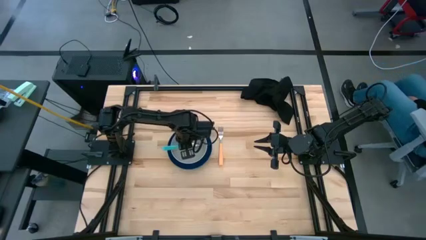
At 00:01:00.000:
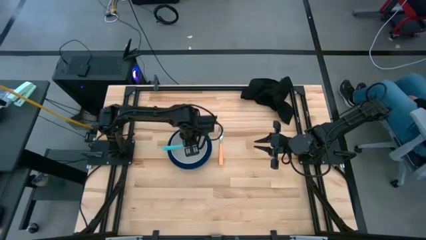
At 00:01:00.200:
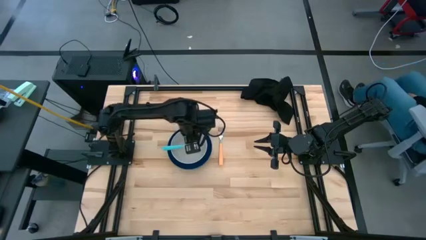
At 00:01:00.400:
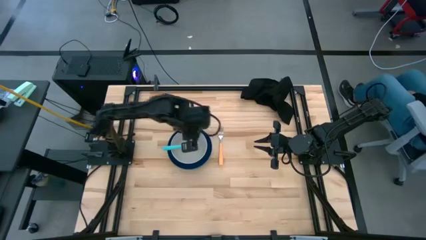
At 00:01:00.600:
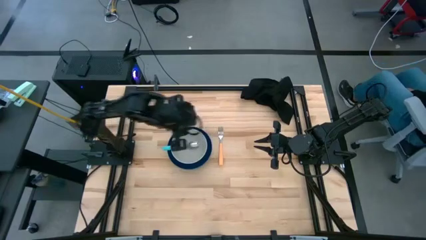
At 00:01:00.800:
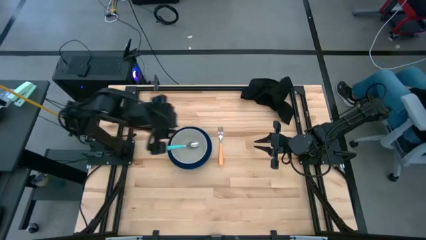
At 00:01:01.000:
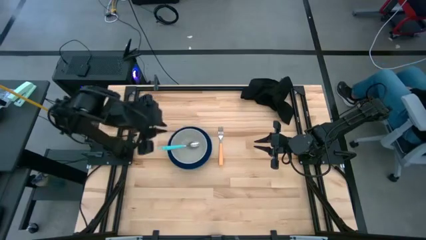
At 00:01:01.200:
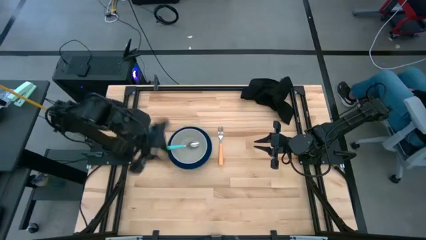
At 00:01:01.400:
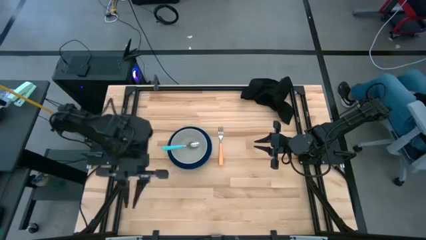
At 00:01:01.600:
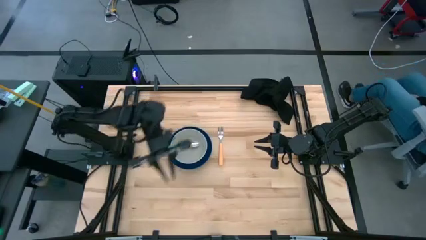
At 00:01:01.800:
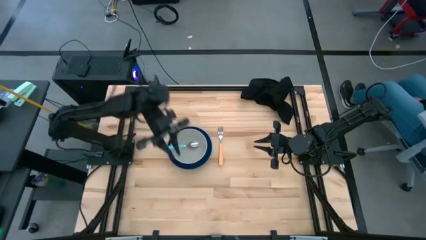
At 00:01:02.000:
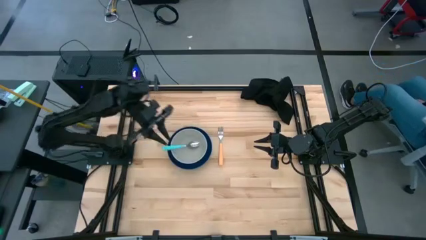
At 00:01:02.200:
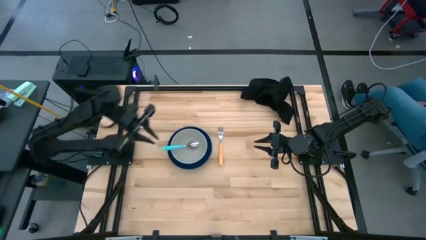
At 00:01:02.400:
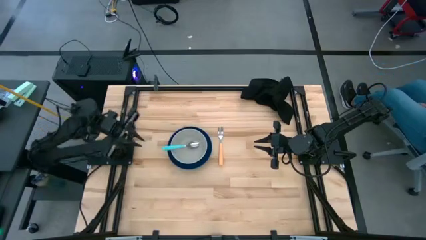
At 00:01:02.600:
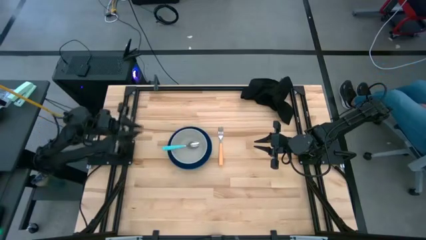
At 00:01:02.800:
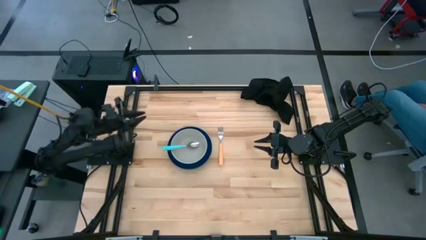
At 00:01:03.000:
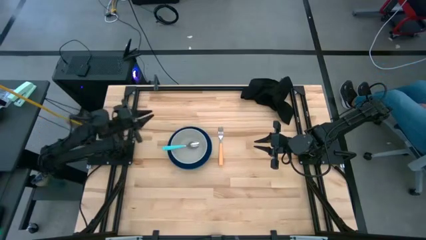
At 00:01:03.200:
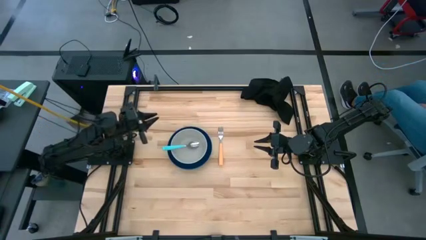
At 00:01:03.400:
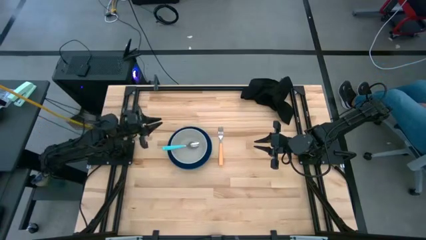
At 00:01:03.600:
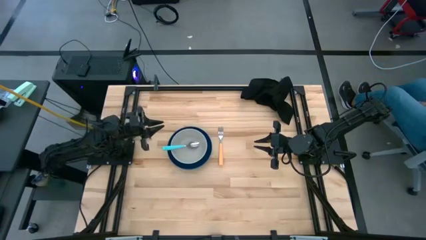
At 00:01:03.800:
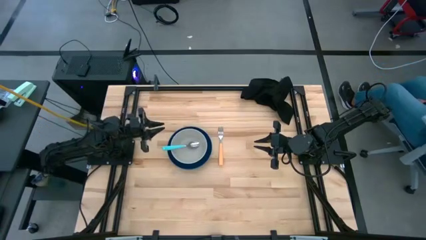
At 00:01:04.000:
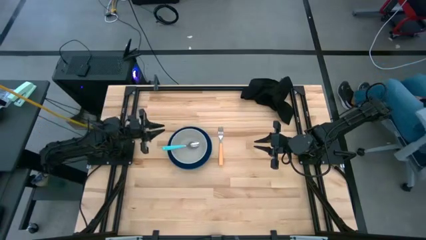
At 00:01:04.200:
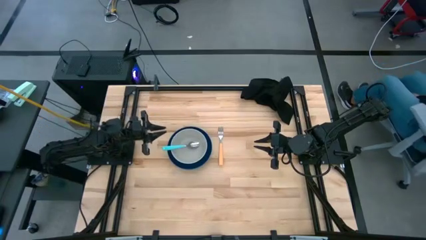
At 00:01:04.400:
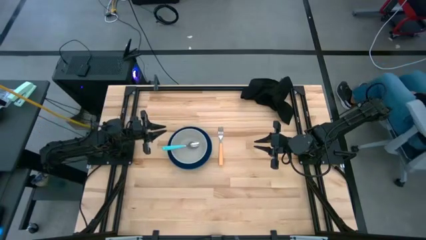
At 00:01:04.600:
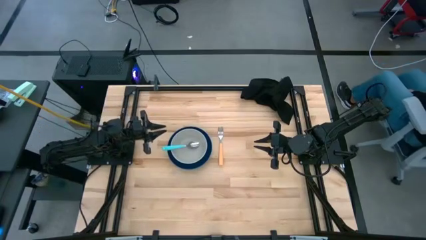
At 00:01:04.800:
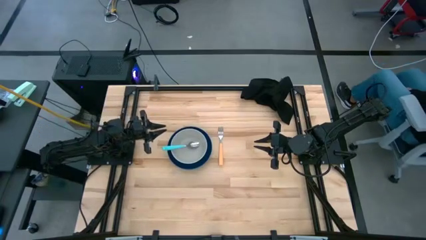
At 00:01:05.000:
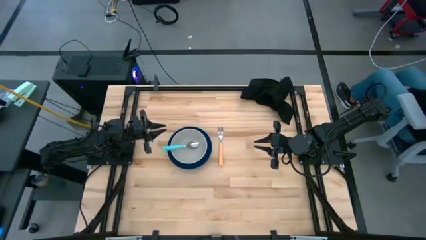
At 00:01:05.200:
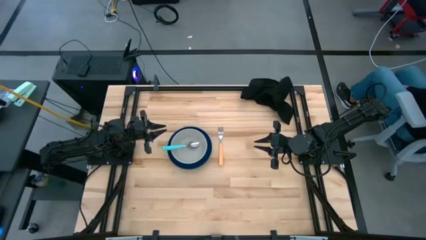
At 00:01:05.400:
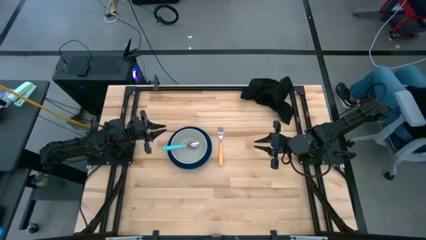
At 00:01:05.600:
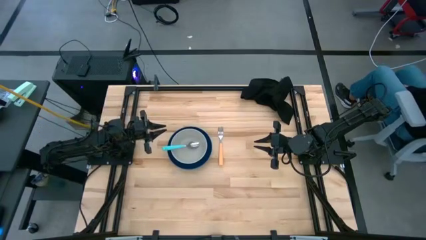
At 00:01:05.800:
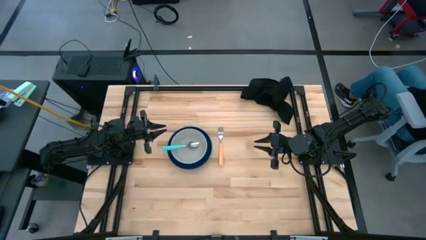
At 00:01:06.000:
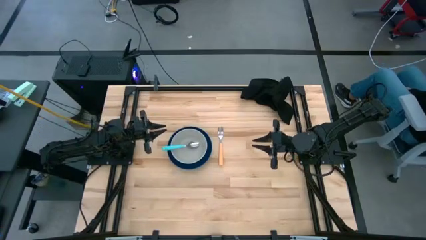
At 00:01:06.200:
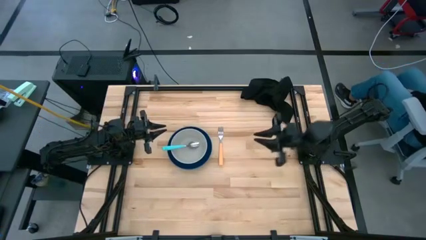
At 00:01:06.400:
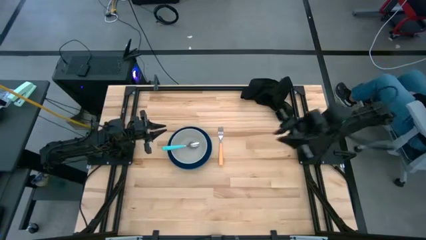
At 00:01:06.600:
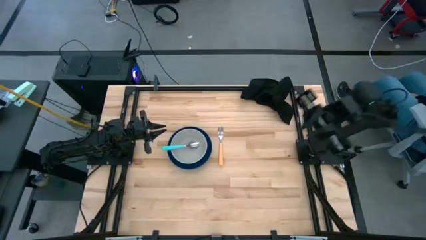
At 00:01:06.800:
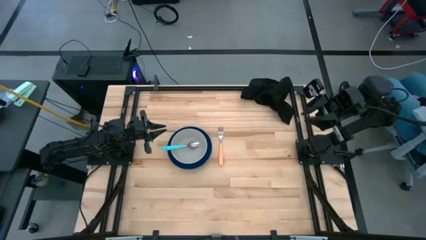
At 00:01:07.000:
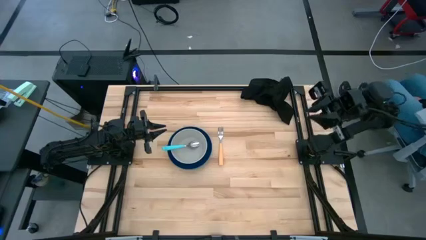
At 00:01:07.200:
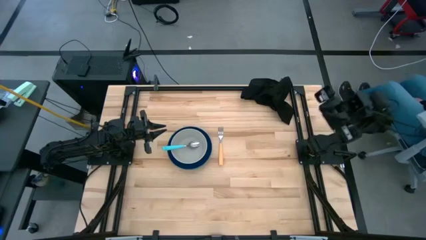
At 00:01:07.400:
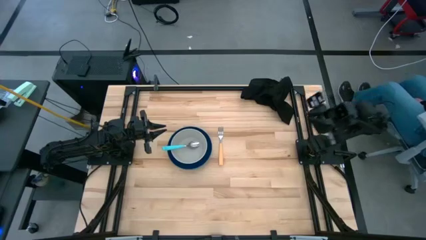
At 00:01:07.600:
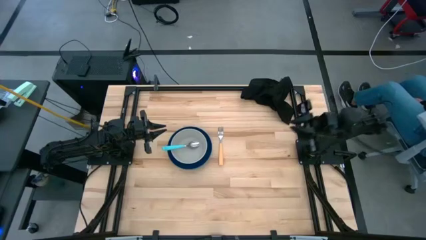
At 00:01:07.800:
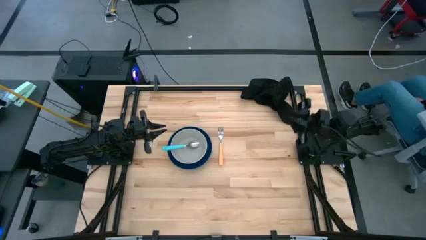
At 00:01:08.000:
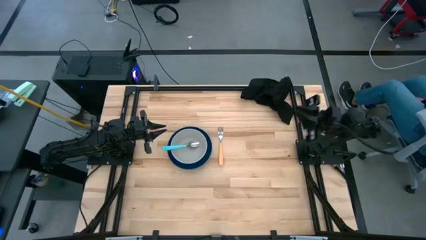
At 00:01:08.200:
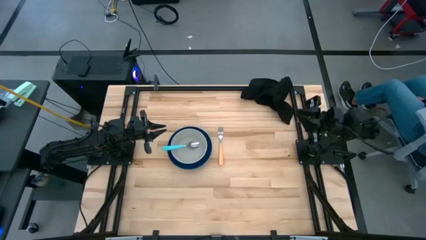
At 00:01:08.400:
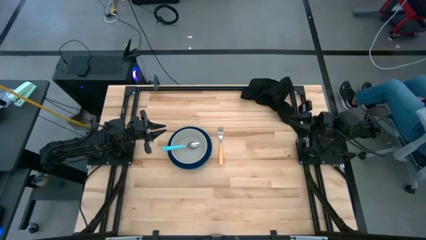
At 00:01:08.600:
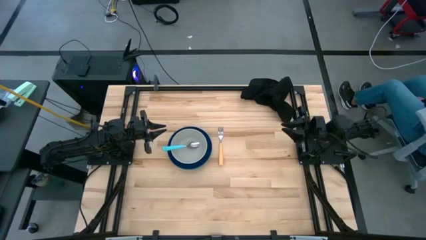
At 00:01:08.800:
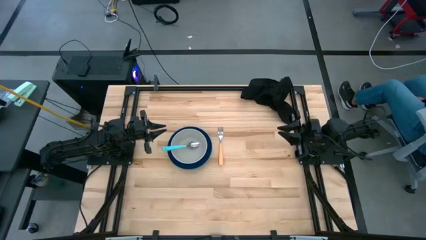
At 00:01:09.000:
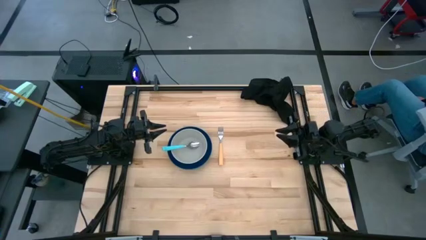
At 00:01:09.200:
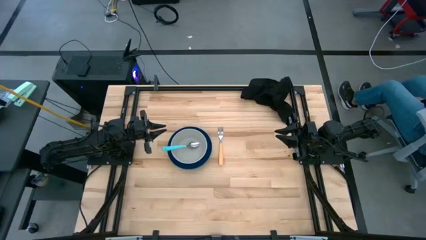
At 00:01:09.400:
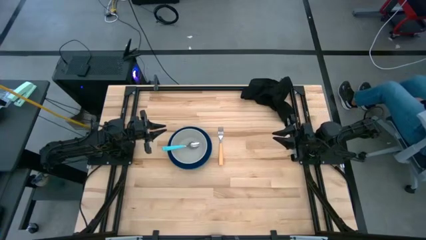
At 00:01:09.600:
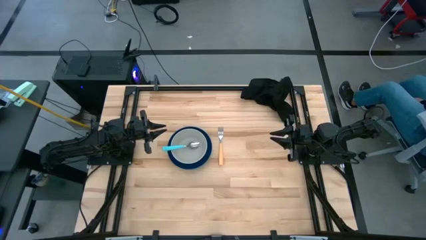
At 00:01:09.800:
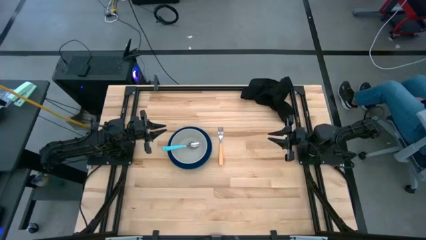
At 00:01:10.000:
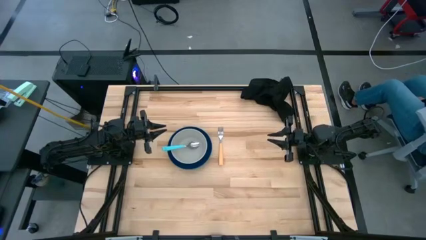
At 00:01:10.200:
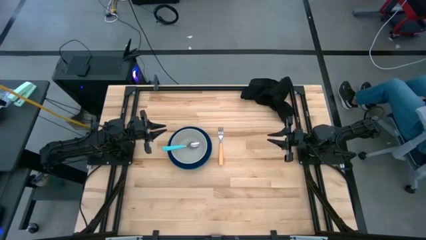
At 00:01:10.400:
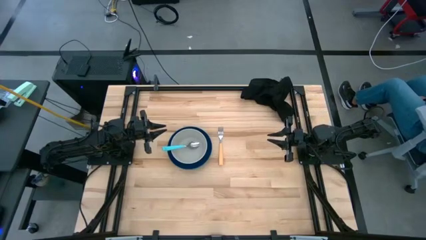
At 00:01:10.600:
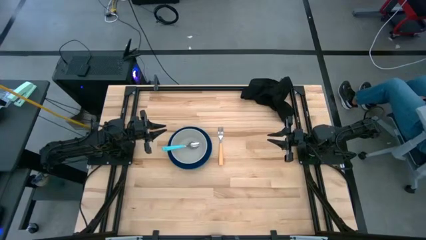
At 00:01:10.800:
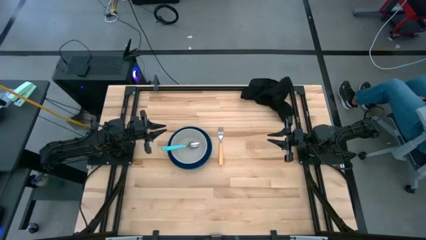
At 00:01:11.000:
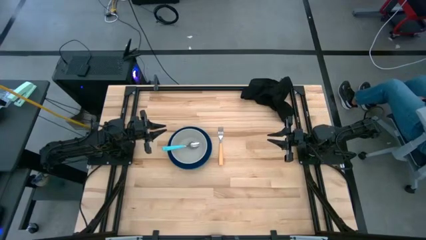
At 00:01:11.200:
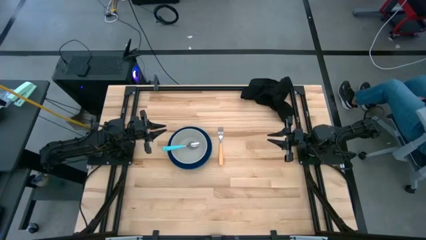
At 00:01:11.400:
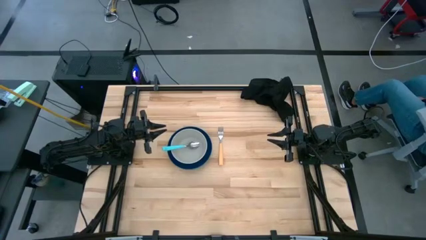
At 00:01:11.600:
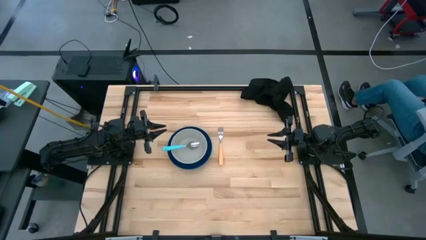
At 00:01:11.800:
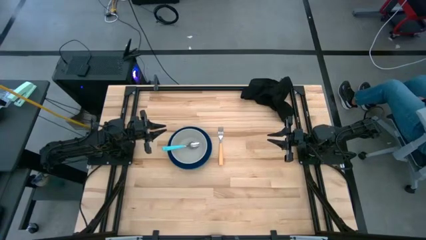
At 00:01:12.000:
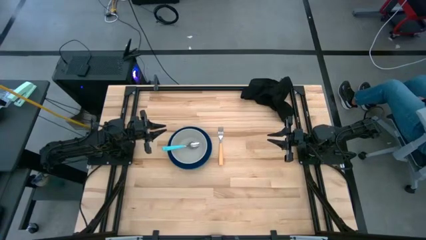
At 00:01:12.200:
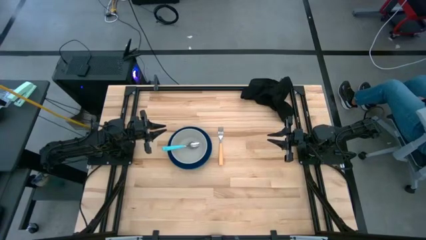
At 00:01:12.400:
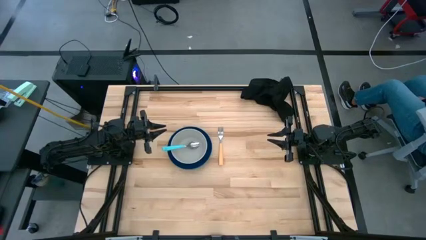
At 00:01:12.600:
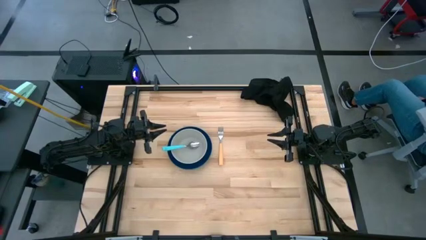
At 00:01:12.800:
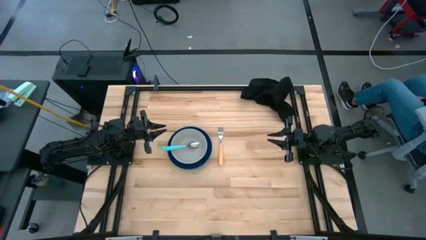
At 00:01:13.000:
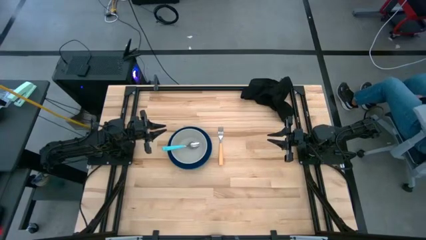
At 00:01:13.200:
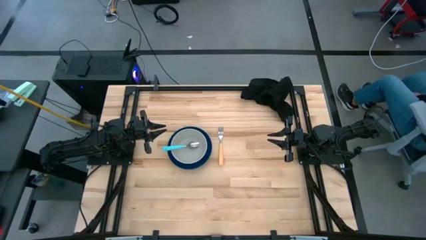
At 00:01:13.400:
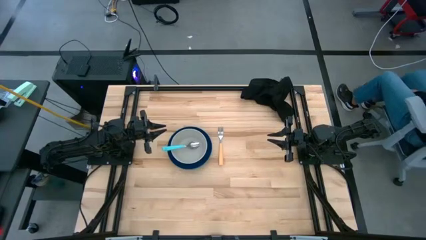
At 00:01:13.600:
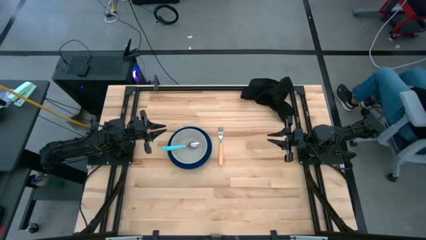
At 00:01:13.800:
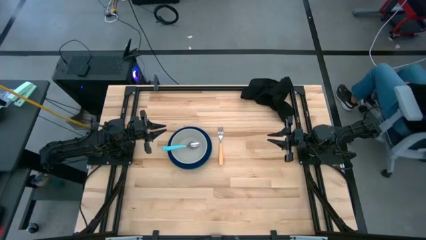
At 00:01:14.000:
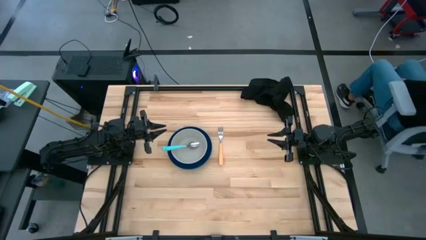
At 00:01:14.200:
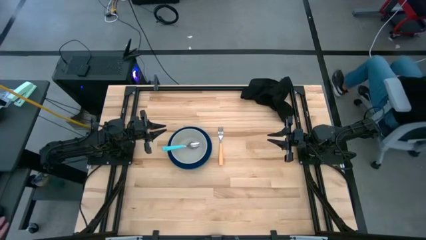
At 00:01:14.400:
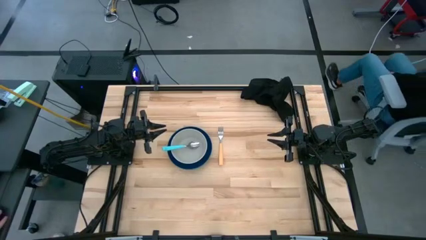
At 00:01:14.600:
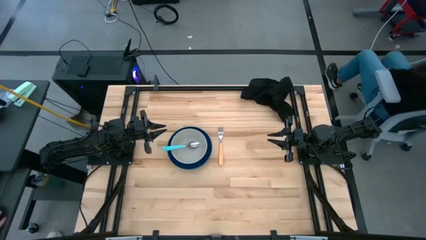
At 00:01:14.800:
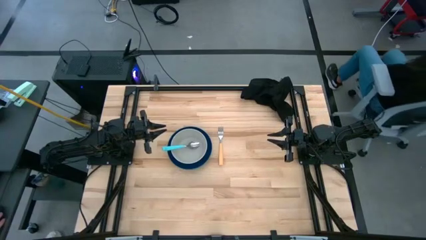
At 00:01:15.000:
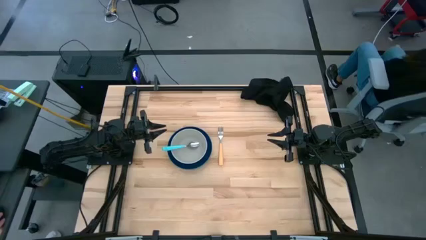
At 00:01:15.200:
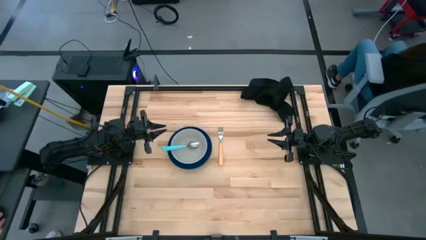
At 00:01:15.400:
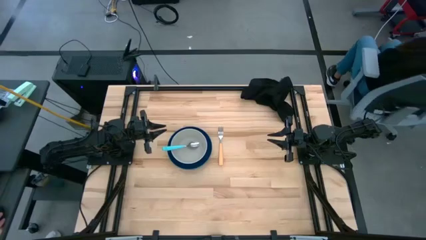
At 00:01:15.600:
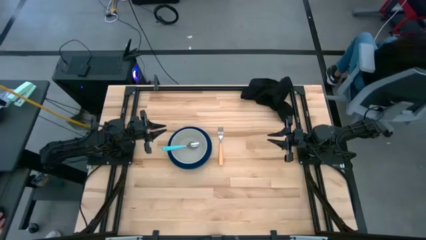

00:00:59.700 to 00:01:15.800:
Task: Set table place
Return to Home Position
